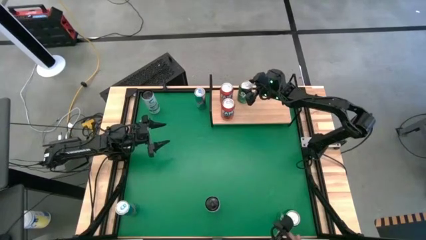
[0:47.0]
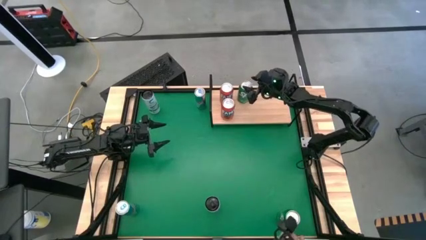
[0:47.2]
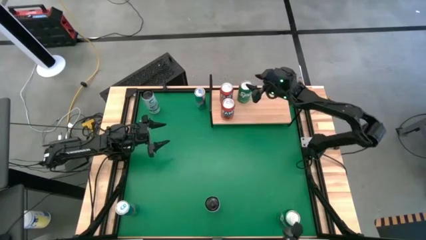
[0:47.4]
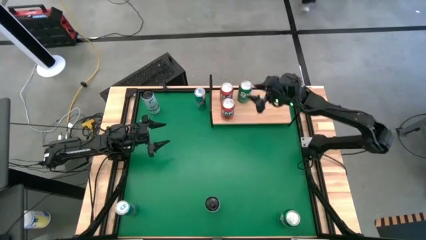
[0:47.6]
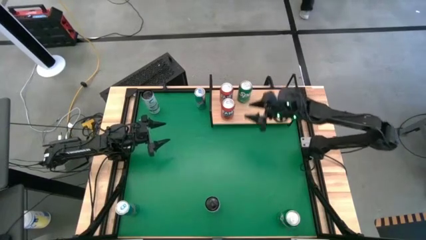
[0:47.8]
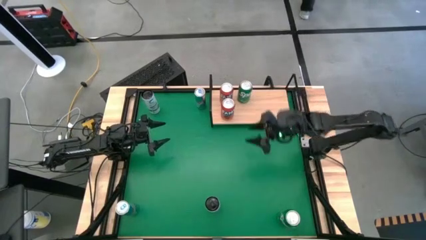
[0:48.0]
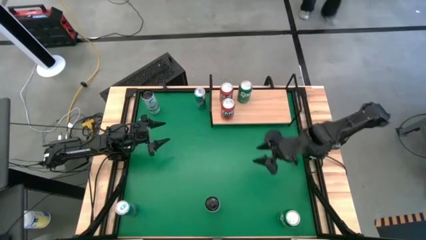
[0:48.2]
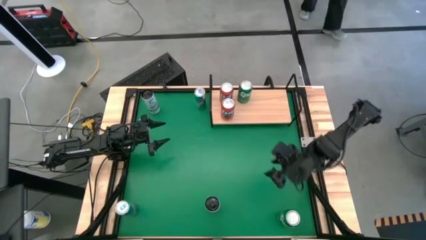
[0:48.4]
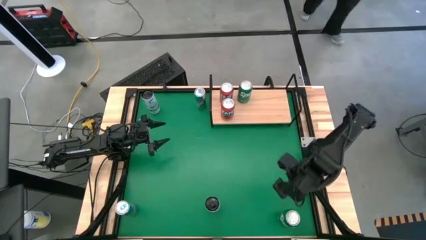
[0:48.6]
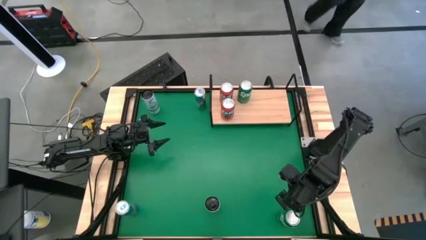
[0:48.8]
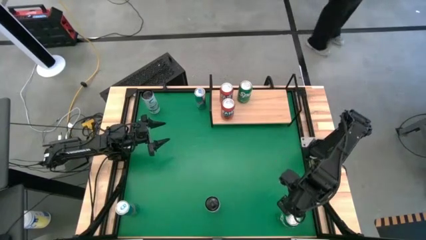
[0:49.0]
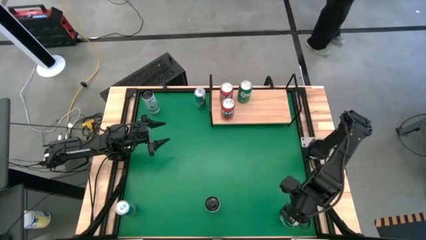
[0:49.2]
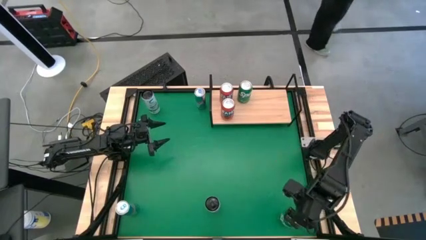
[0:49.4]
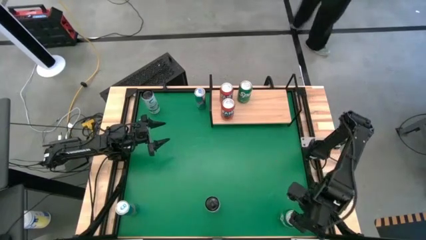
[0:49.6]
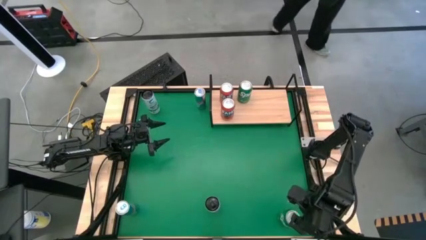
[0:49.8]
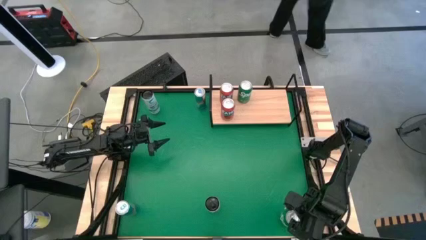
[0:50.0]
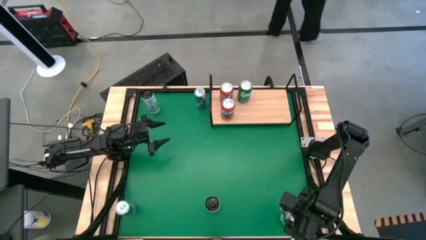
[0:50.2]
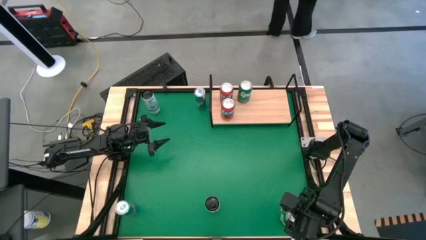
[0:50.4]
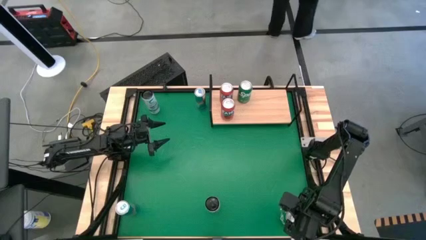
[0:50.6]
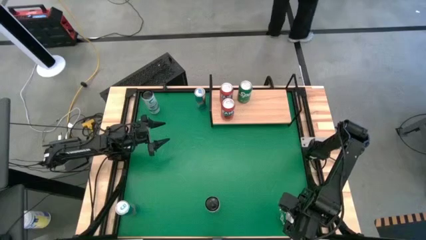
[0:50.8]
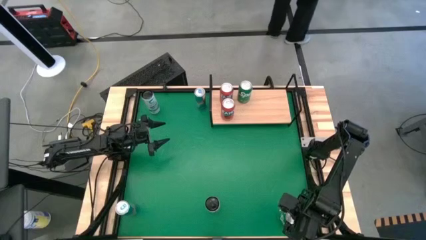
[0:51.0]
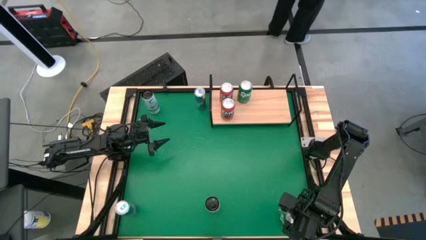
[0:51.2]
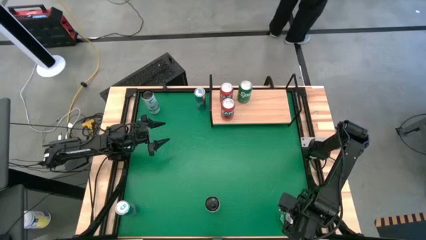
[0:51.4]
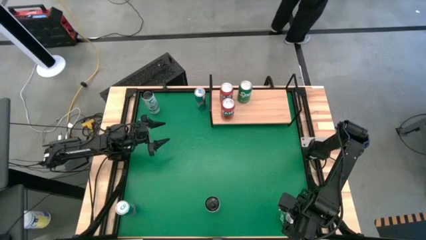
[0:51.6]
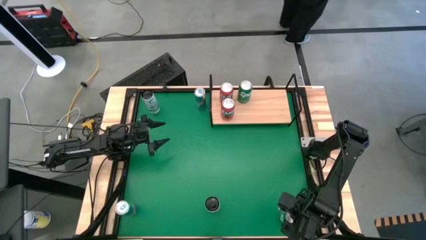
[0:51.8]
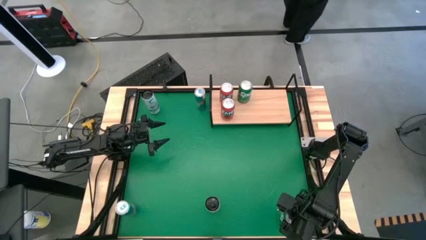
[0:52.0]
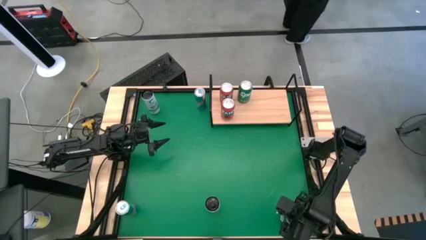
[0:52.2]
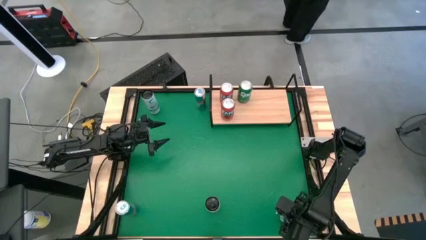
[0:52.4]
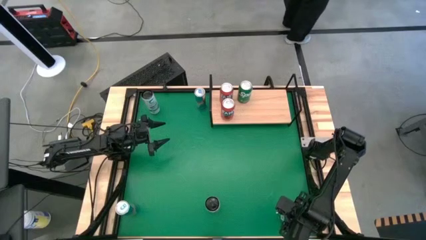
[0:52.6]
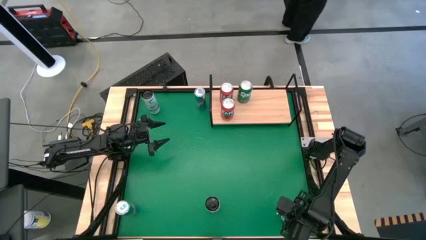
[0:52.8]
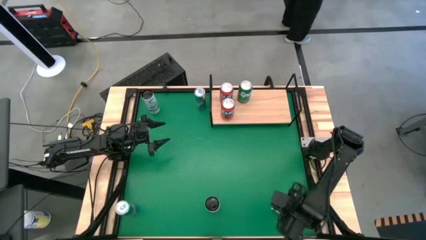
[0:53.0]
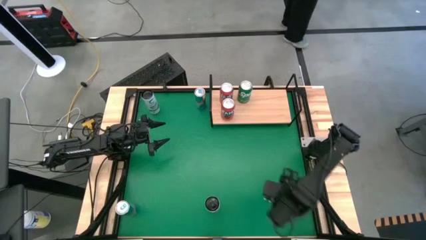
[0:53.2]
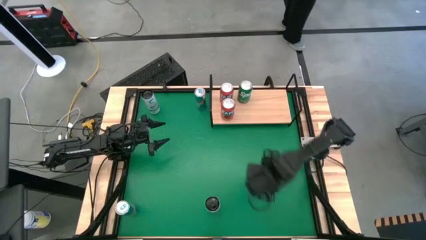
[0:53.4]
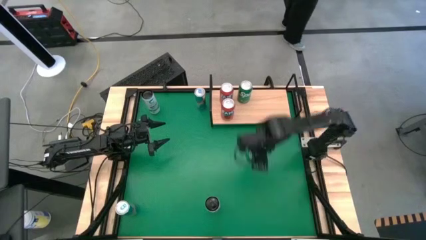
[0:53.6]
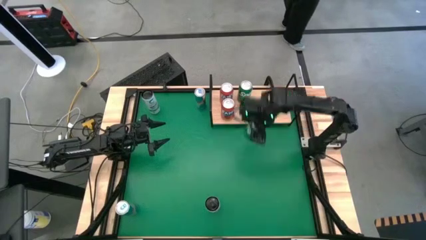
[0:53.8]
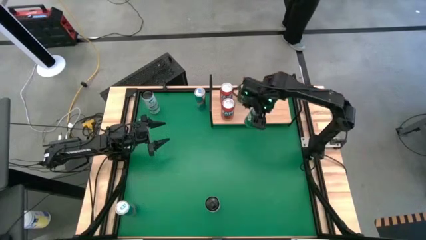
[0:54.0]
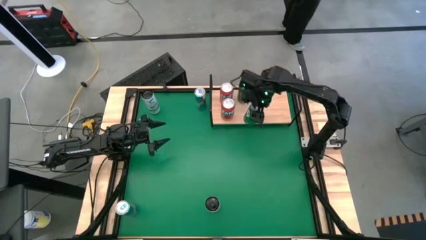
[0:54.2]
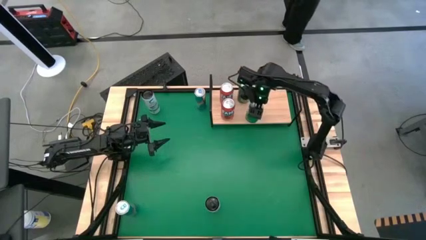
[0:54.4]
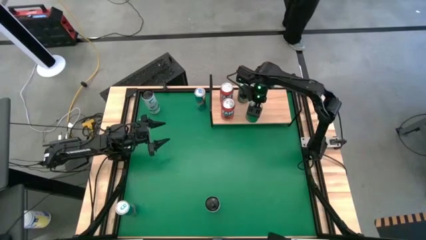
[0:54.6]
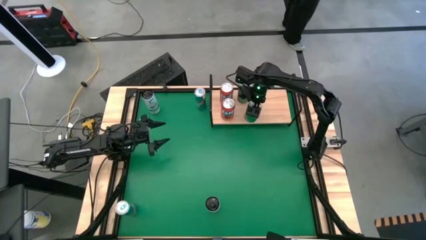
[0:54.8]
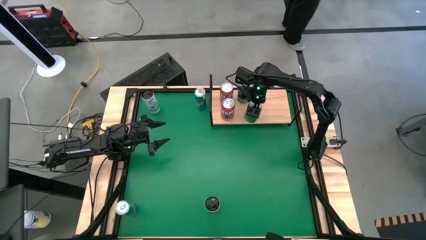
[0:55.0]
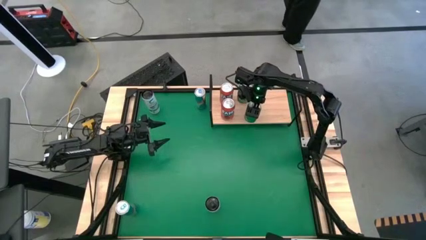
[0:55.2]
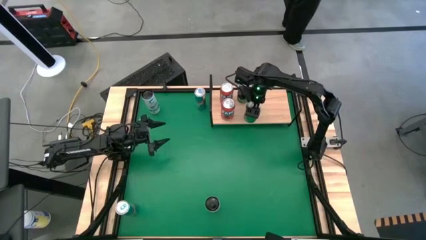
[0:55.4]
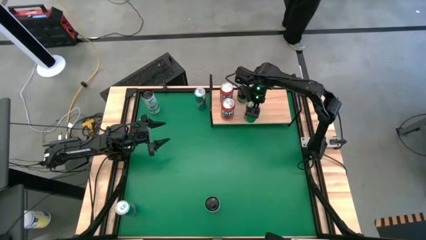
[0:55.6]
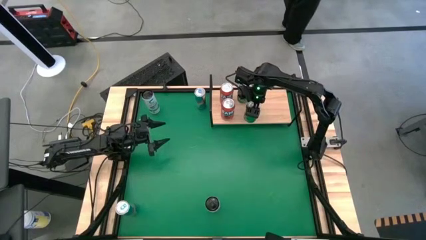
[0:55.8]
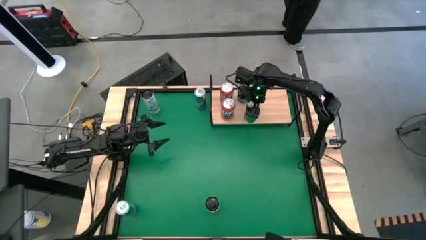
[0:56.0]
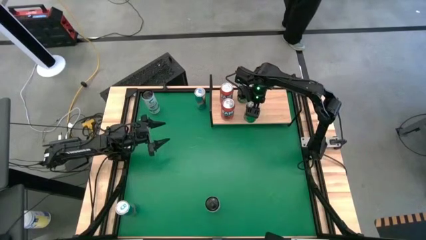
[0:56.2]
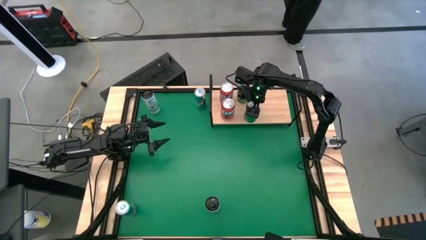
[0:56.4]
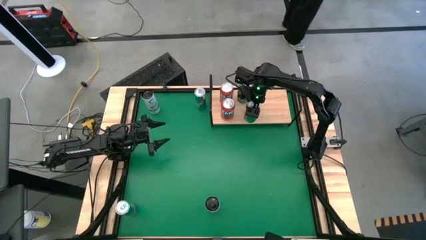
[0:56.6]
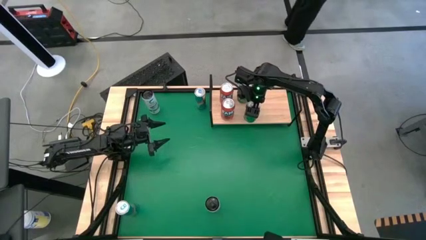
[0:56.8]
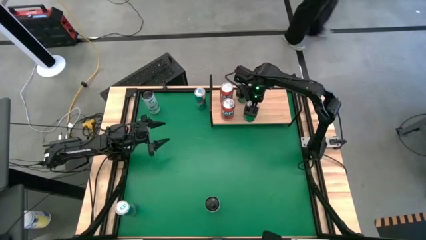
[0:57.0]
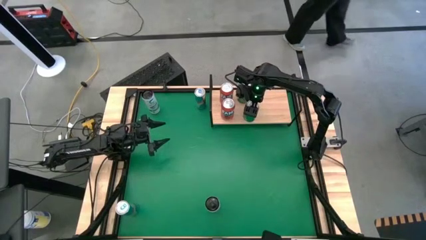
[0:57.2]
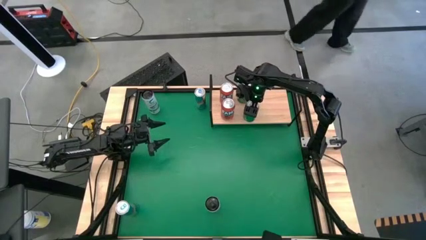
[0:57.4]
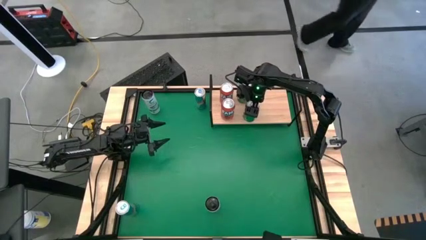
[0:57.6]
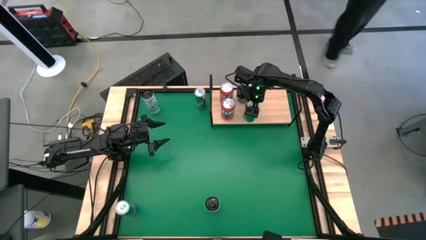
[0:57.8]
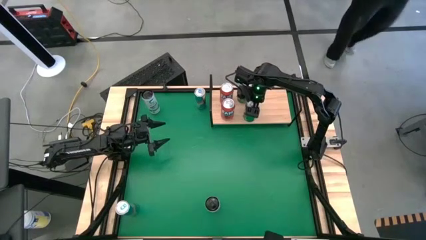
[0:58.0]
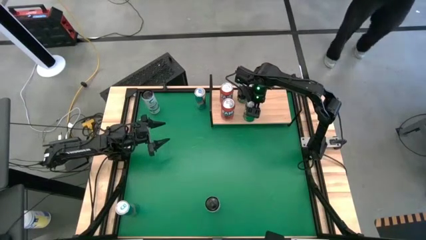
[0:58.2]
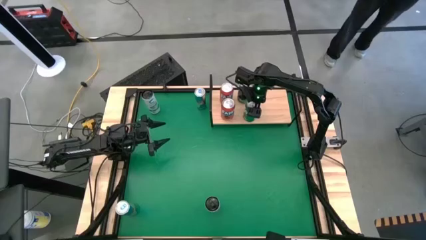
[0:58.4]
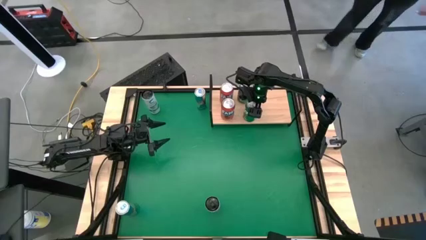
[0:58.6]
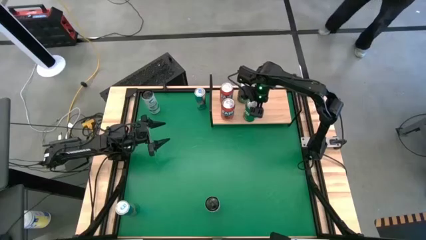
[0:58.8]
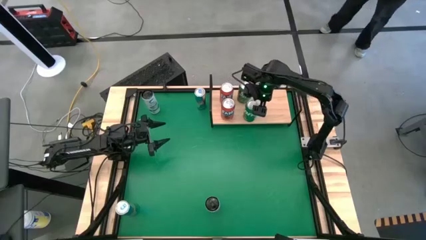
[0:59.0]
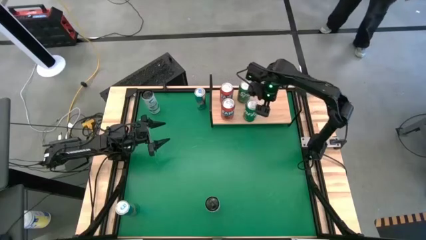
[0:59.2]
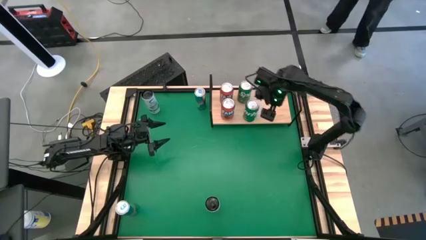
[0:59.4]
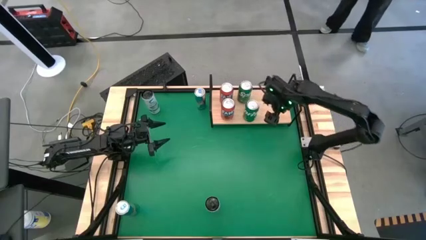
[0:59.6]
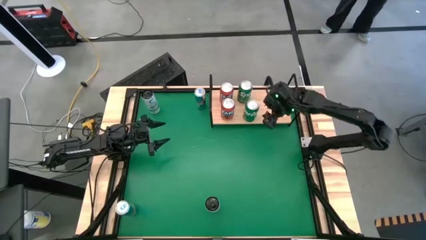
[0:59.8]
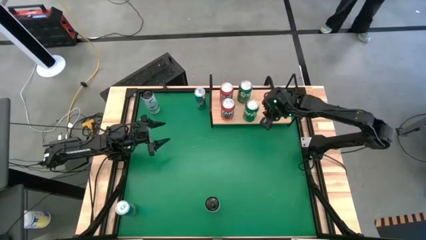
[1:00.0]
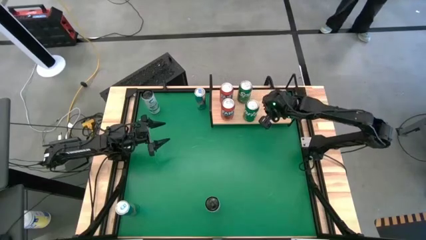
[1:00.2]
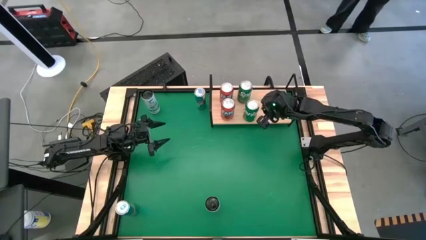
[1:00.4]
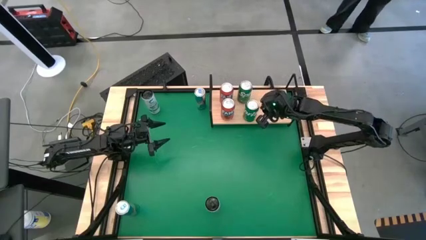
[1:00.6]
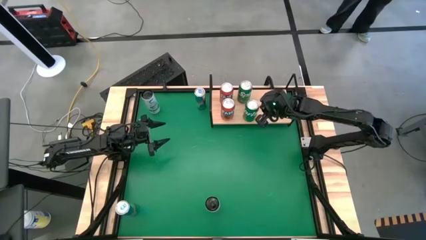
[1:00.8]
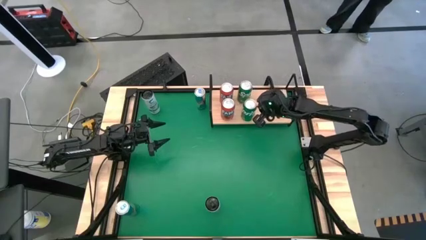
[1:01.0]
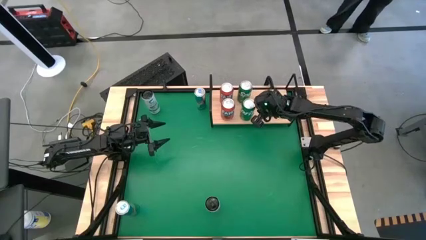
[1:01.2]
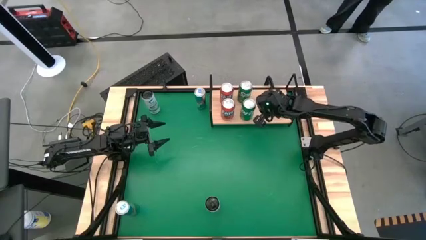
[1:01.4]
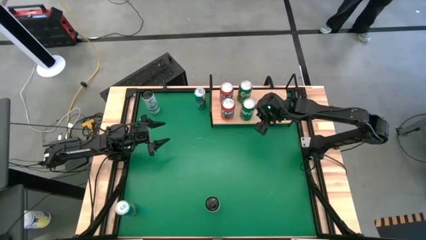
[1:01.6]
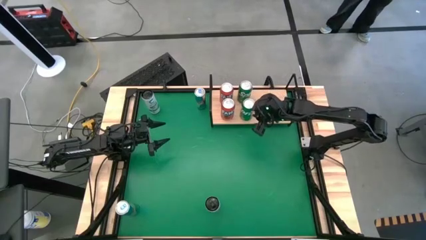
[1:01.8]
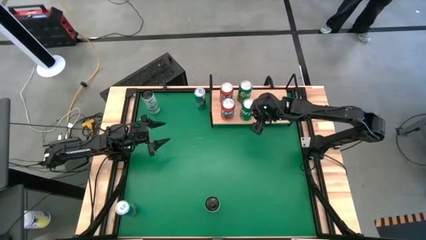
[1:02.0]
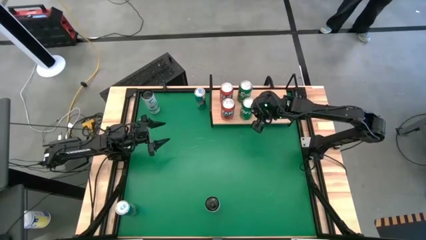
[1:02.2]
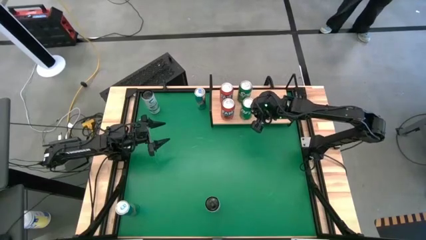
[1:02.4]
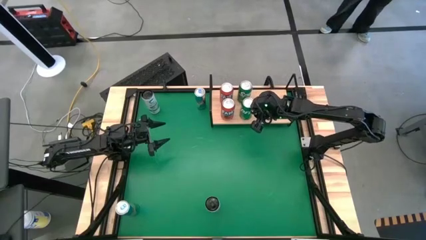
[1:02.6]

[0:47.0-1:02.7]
Task: Place canned beverage on shelf
Put the green soda can on the shelf aligned with the other green soda can
